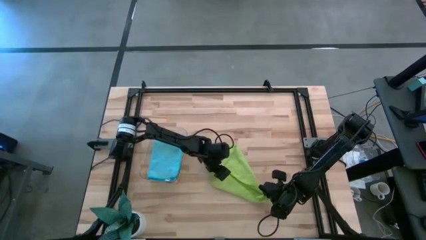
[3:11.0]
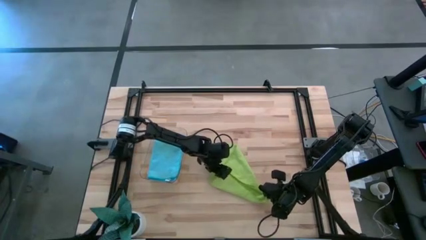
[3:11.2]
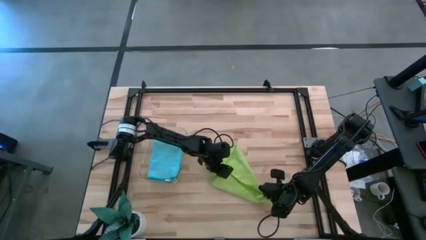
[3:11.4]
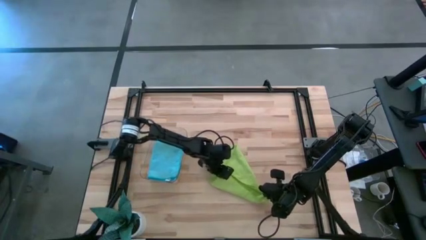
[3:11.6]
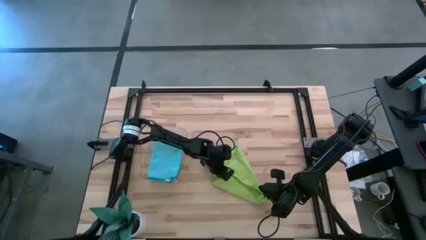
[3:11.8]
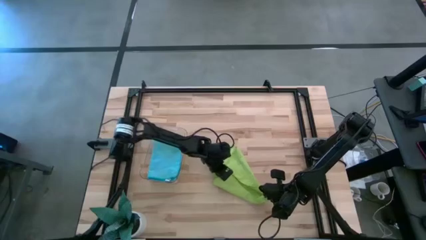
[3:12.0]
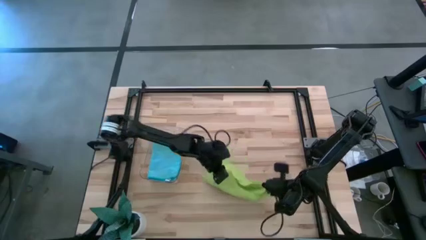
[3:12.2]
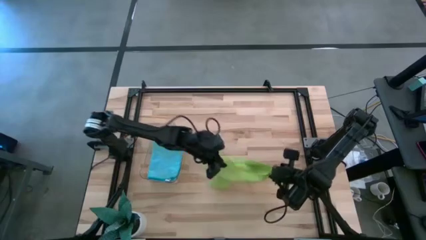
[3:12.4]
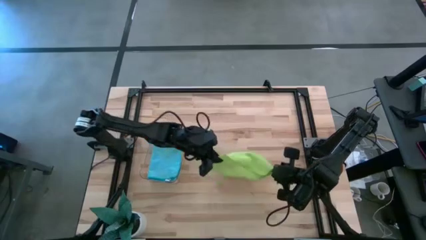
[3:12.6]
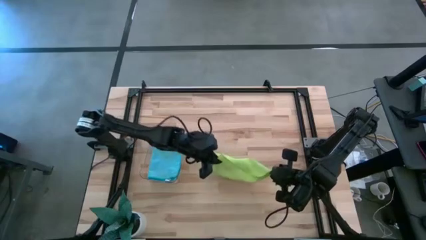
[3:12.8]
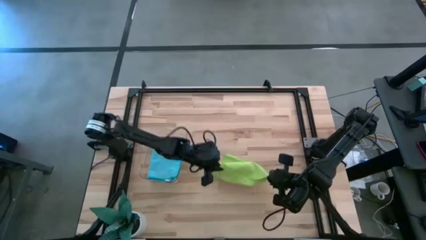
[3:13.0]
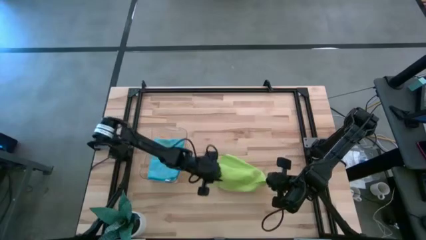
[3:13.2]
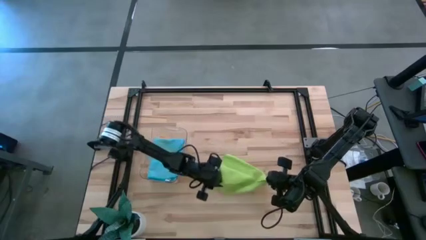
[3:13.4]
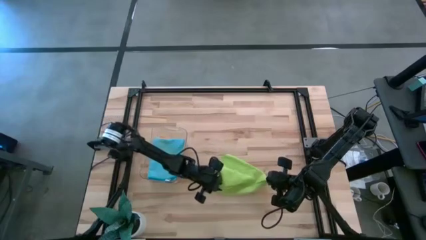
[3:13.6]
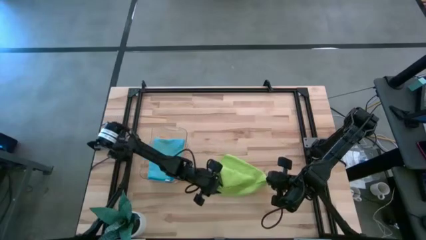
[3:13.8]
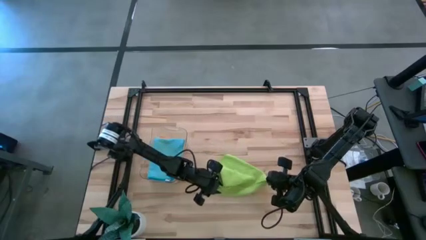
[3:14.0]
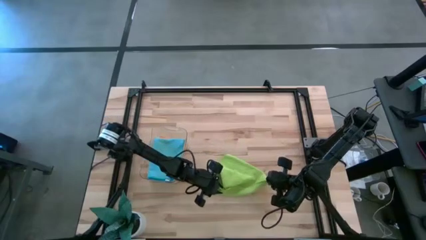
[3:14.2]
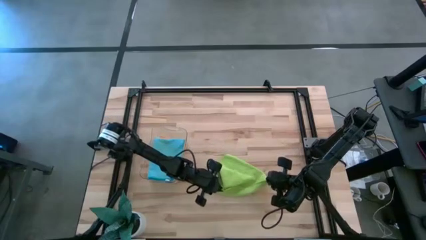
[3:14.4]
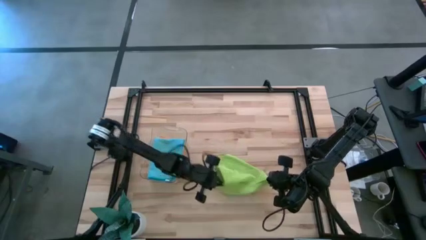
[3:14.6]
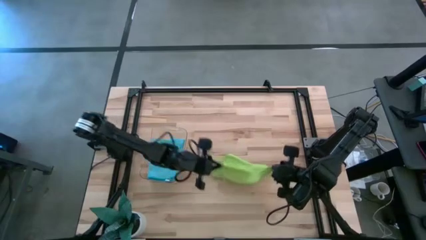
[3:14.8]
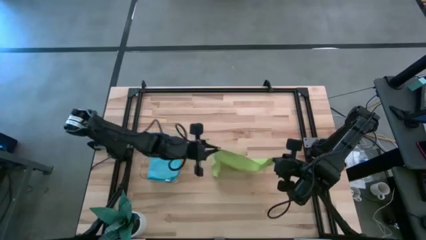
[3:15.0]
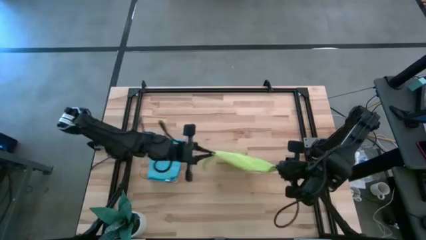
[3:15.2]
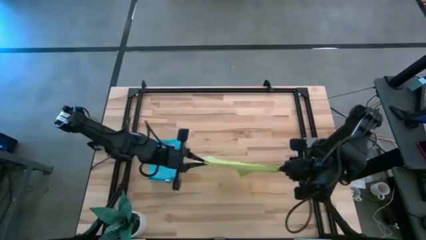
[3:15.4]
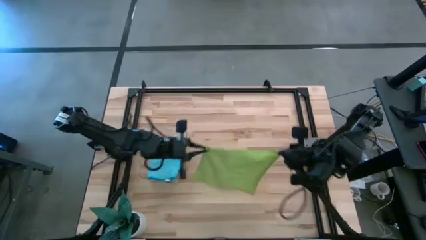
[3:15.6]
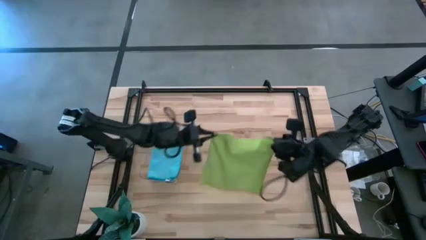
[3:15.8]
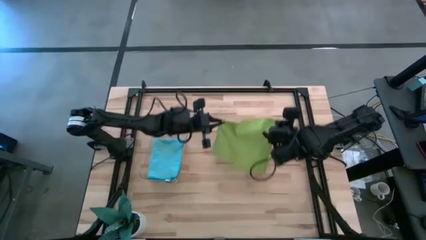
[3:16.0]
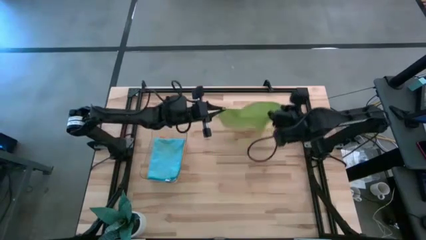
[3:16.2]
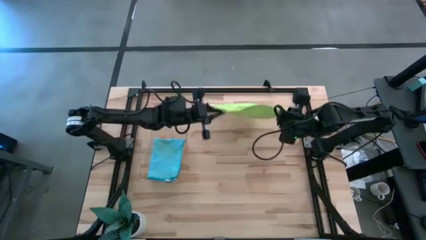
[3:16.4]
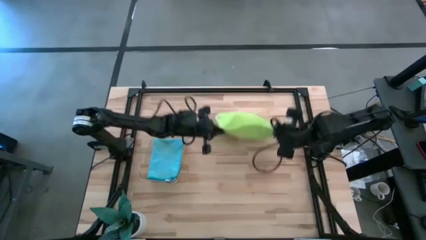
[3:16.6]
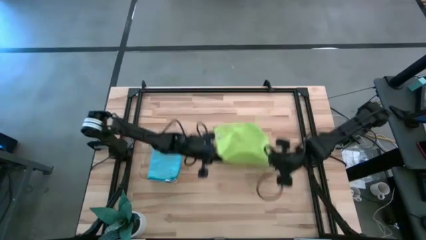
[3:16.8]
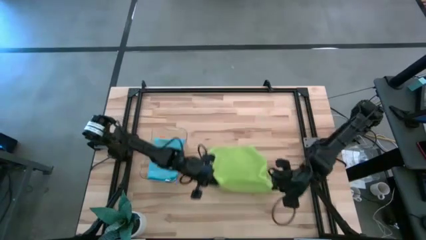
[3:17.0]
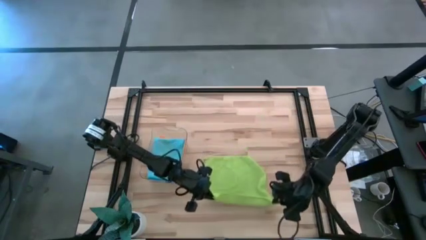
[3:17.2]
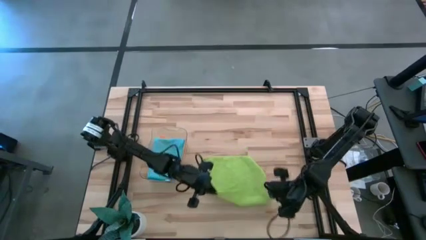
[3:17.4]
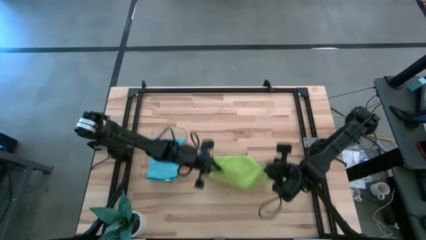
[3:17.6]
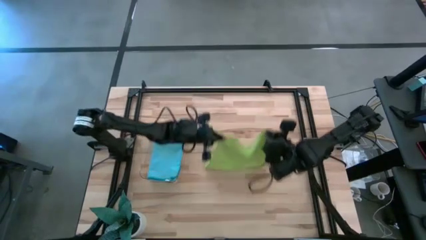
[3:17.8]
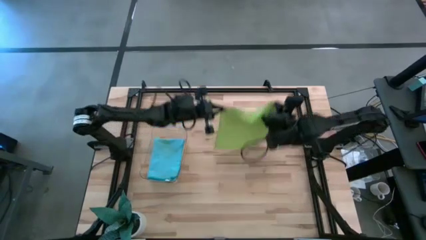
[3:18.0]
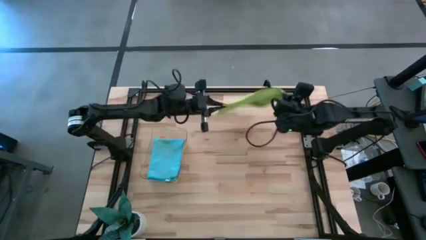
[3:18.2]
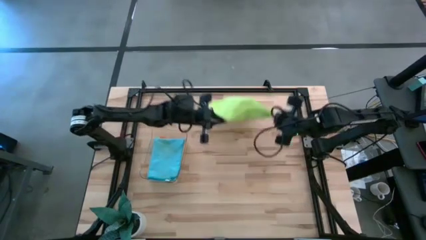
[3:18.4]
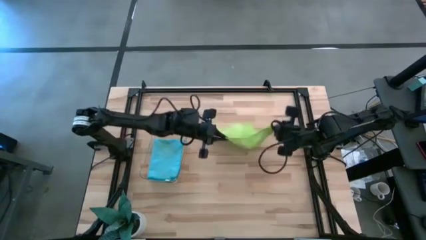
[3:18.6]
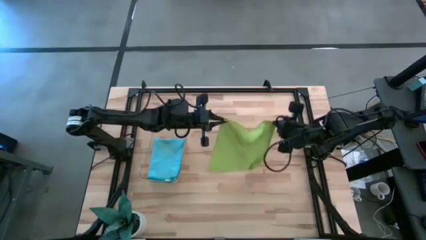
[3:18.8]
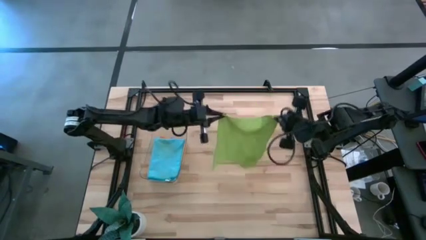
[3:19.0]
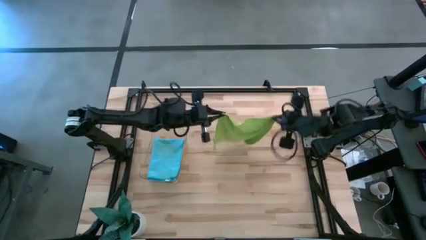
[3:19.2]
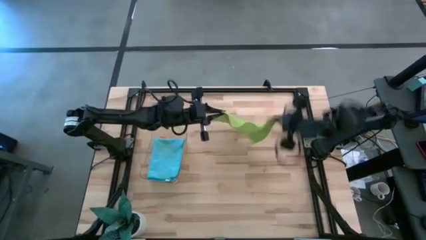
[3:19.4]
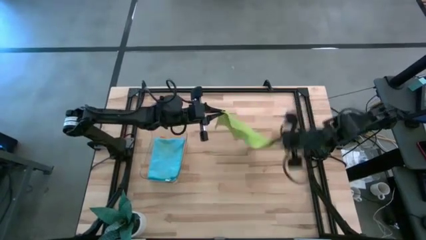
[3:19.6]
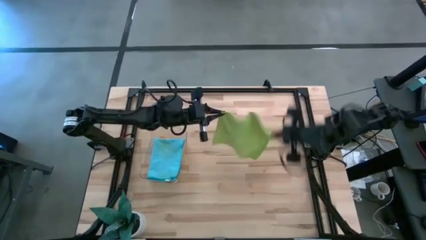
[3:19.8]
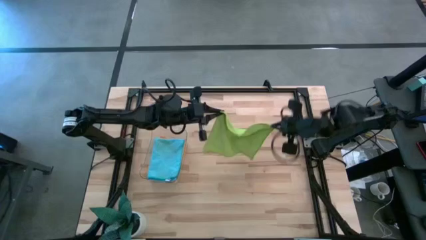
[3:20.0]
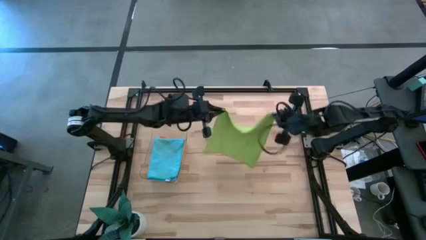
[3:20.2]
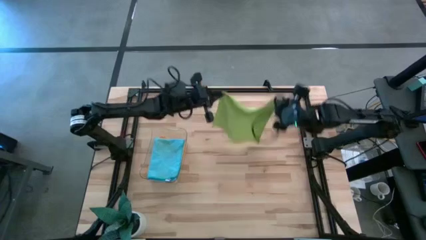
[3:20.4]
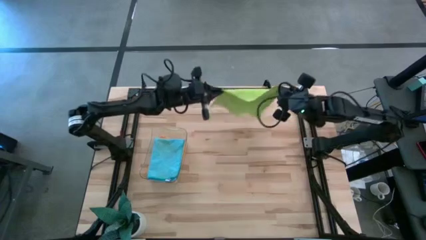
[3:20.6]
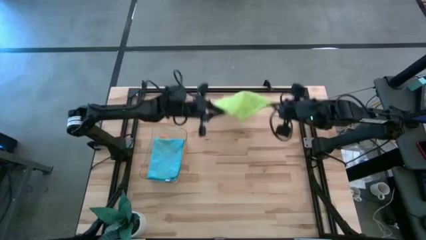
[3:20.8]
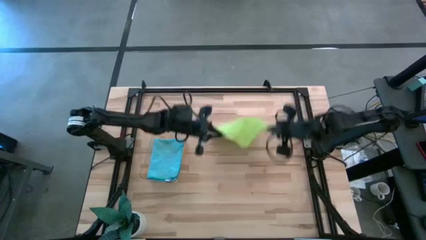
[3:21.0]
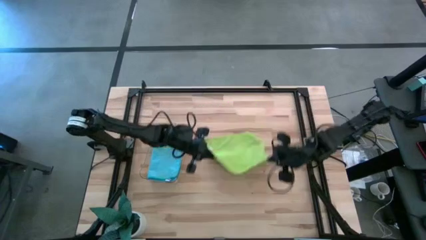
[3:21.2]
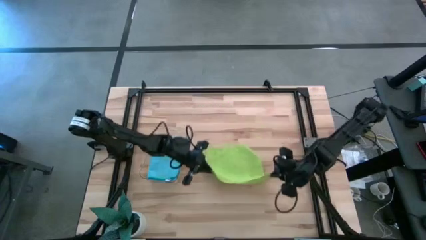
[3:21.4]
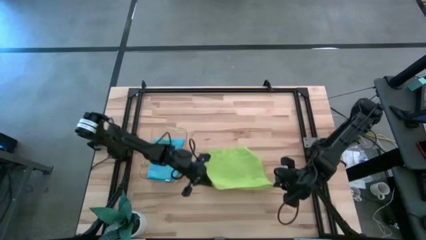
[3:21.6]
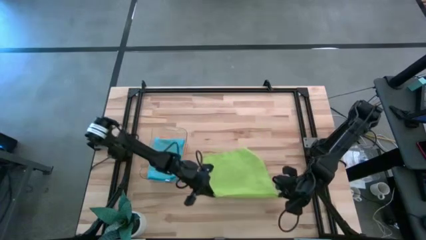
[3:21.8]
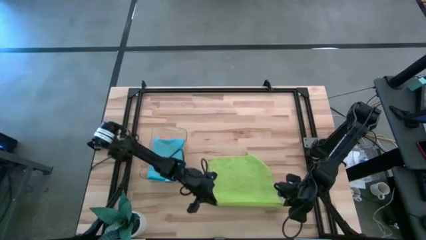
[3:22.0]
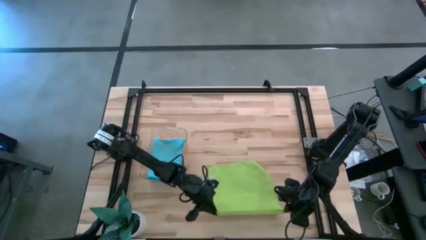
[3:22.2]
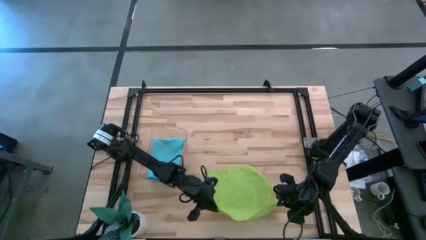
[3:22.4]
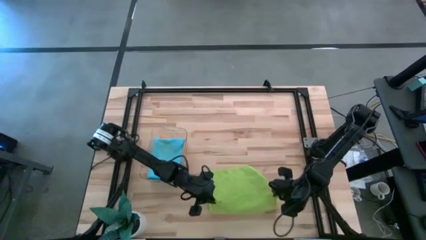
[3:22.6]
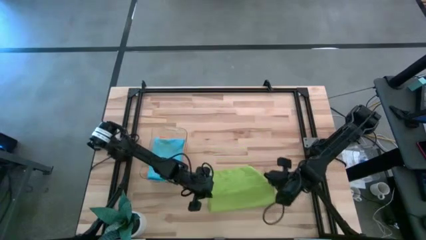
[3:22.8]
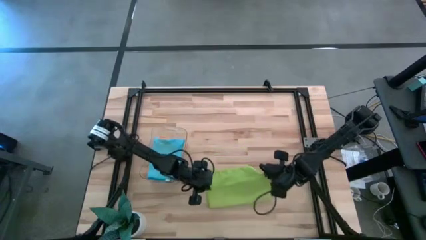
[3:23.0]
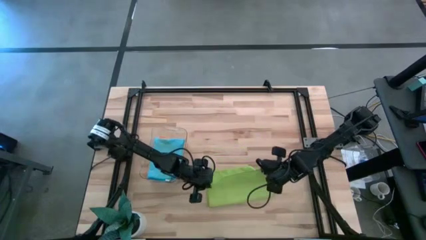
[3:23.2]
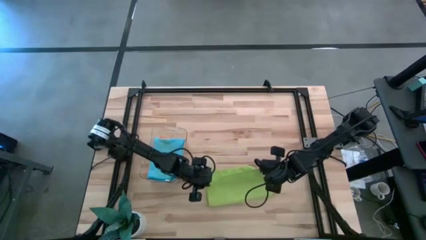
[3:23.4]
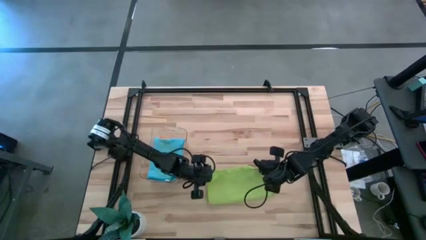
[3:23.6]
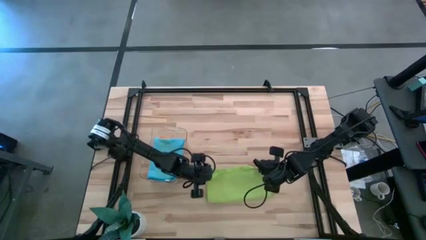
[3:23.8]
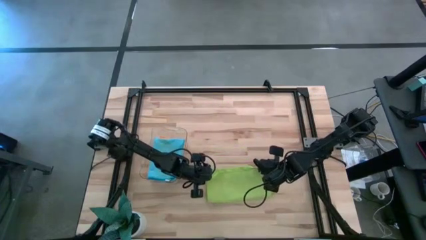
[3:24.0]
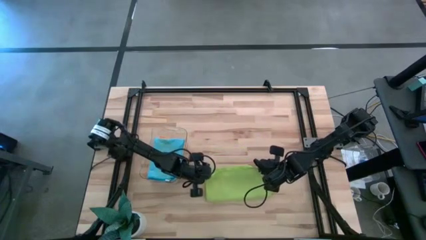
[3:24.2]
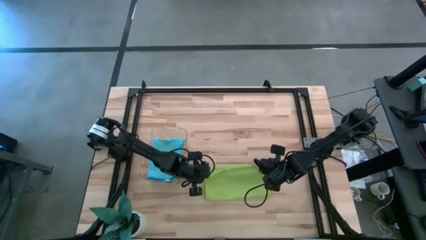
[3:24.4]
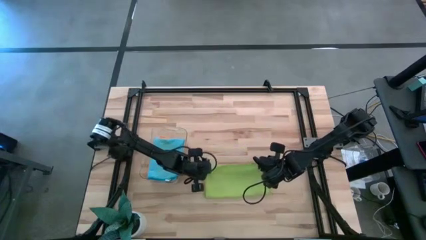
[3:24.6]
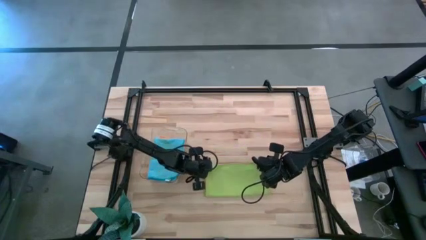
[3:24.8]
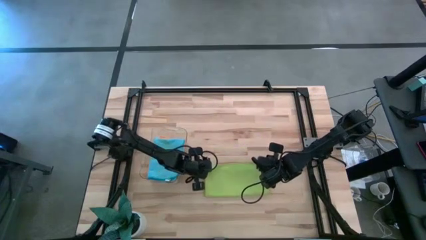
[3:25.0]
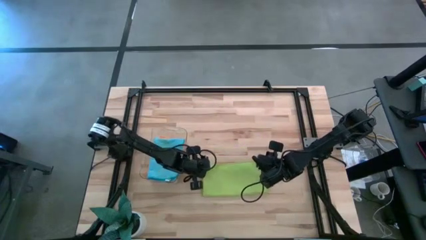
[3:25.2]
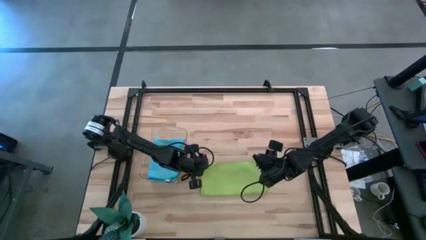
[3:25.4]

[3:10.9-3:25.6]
Task: Fold microfiber towels
Fold the green microfiber towel on the table
